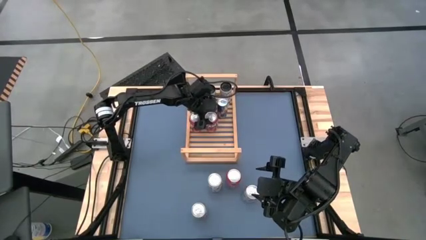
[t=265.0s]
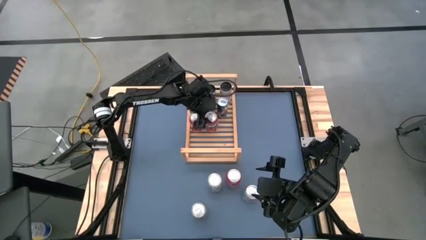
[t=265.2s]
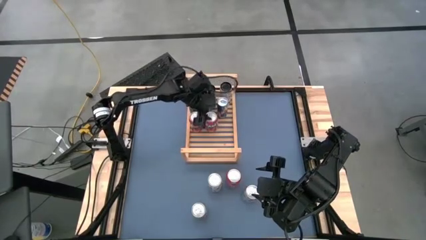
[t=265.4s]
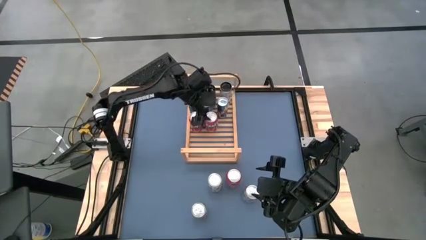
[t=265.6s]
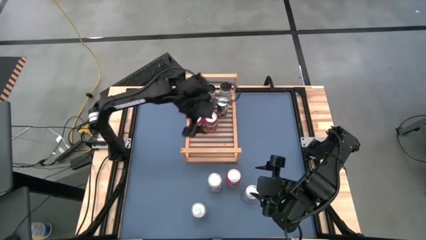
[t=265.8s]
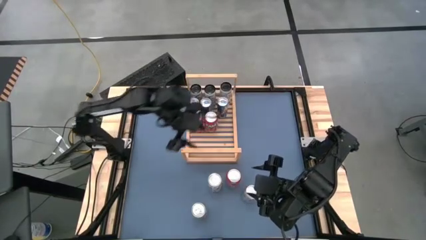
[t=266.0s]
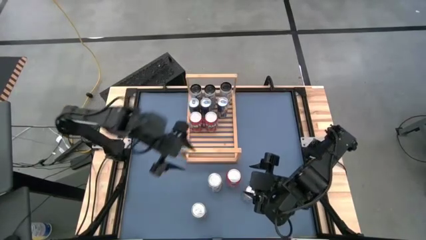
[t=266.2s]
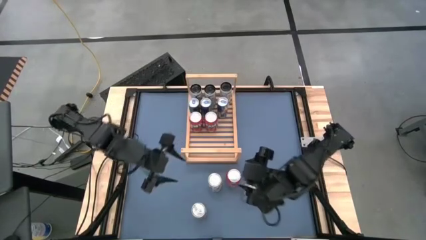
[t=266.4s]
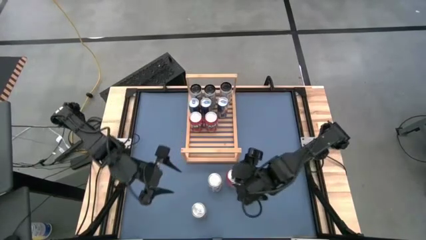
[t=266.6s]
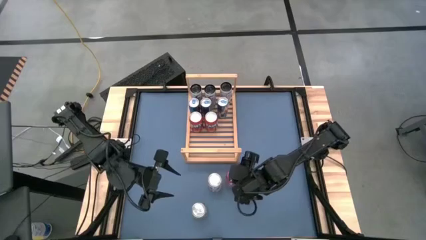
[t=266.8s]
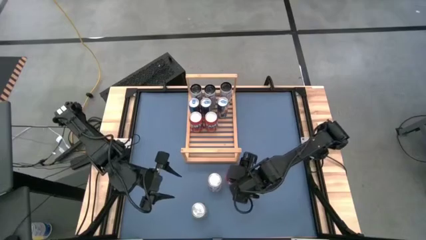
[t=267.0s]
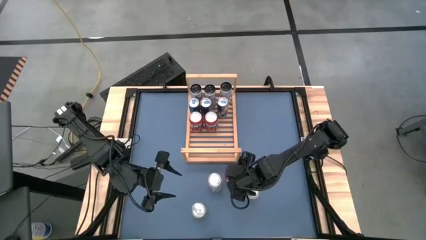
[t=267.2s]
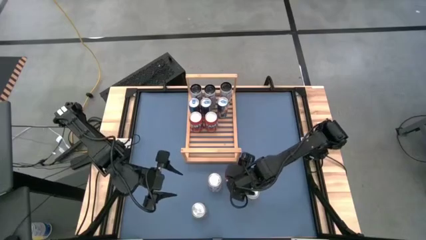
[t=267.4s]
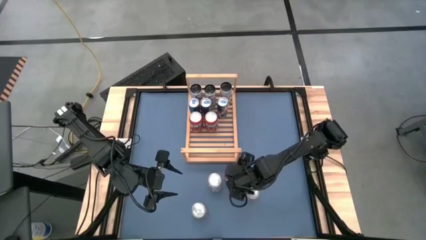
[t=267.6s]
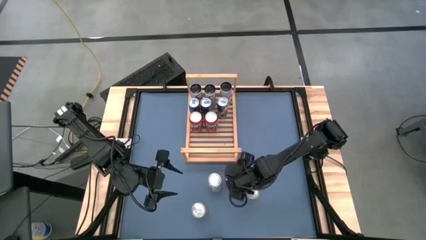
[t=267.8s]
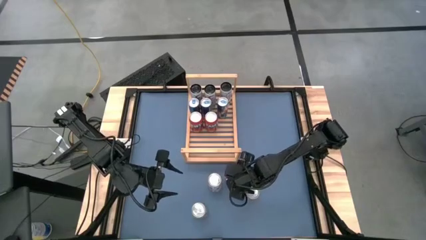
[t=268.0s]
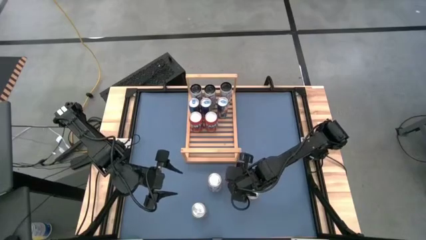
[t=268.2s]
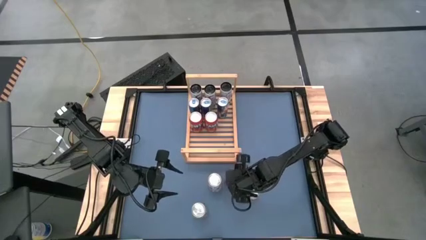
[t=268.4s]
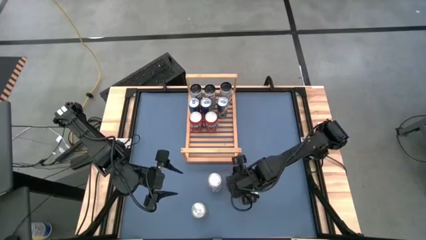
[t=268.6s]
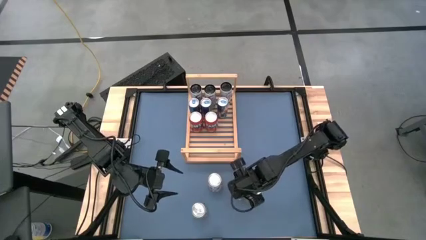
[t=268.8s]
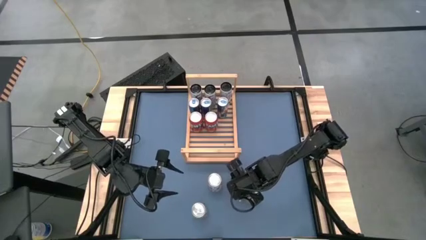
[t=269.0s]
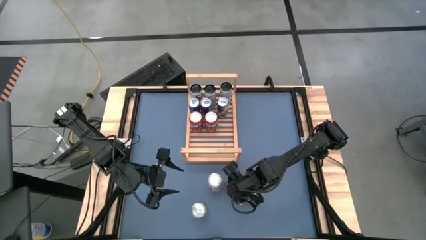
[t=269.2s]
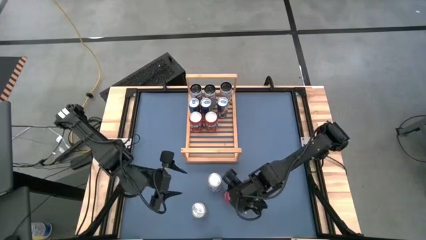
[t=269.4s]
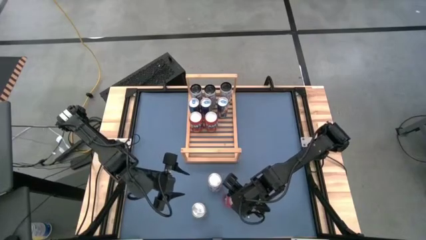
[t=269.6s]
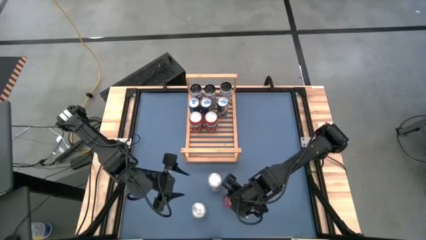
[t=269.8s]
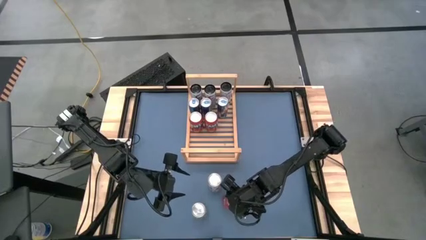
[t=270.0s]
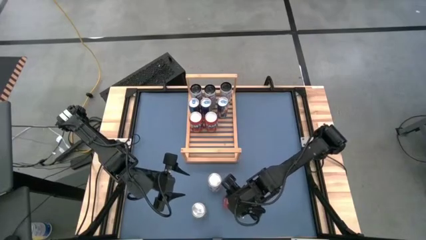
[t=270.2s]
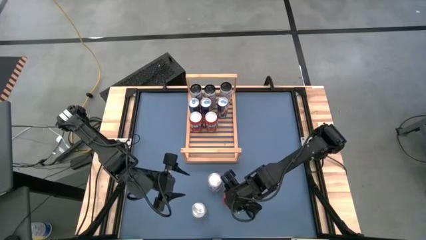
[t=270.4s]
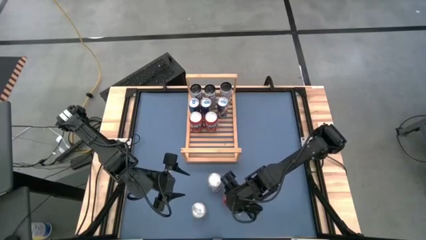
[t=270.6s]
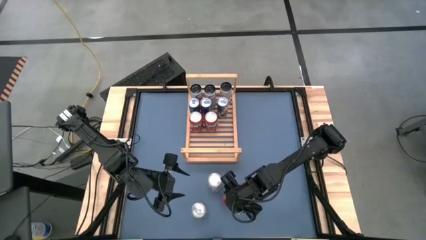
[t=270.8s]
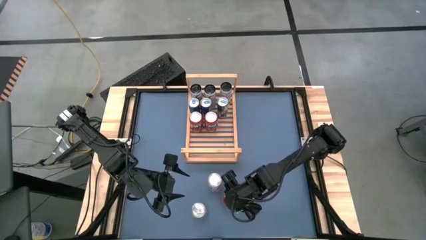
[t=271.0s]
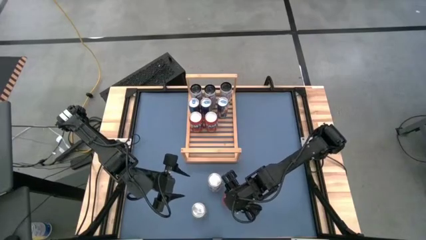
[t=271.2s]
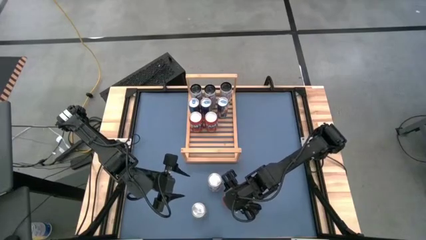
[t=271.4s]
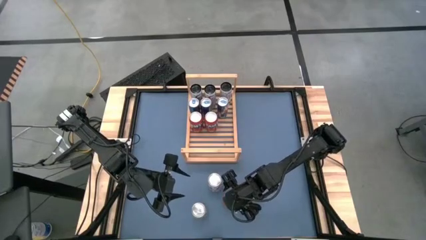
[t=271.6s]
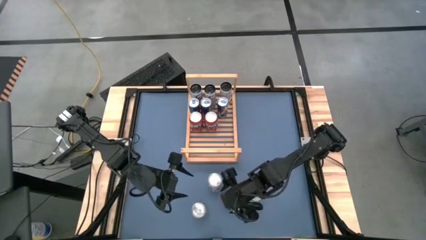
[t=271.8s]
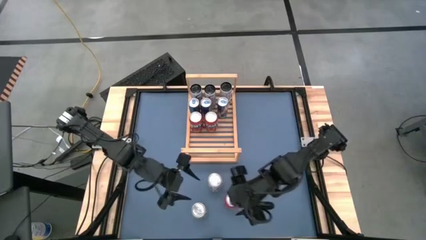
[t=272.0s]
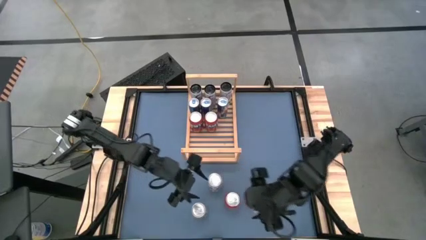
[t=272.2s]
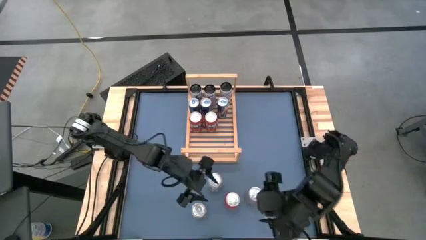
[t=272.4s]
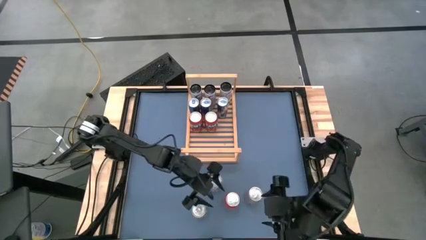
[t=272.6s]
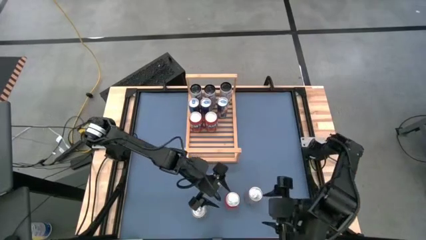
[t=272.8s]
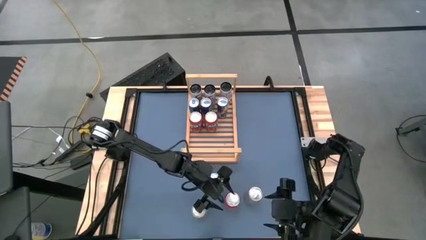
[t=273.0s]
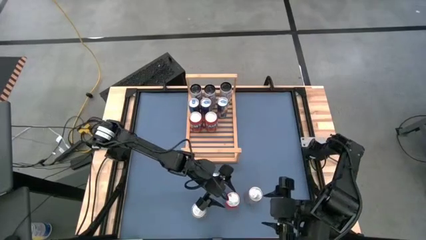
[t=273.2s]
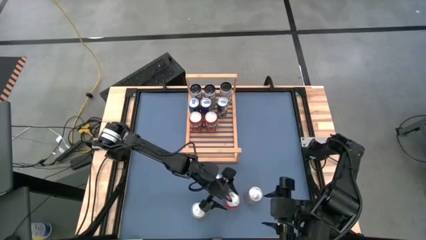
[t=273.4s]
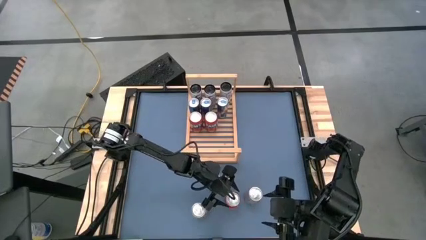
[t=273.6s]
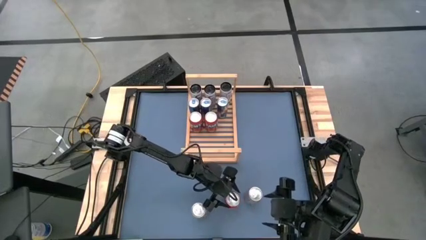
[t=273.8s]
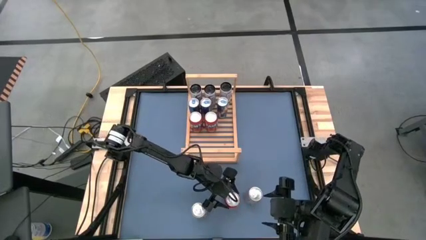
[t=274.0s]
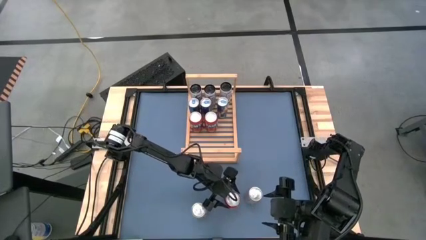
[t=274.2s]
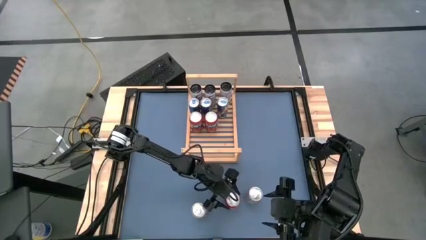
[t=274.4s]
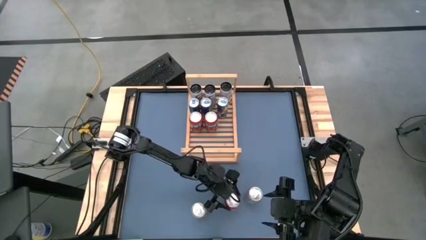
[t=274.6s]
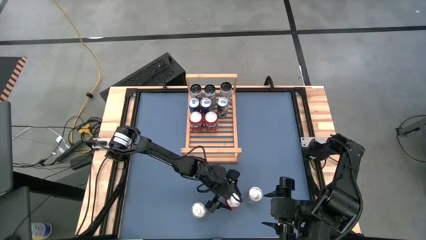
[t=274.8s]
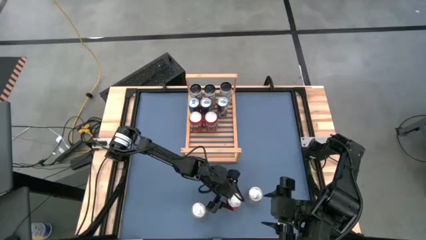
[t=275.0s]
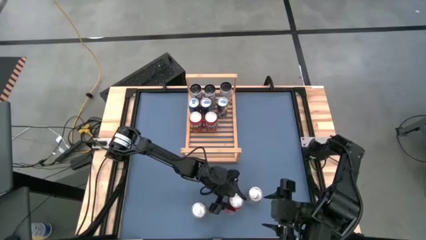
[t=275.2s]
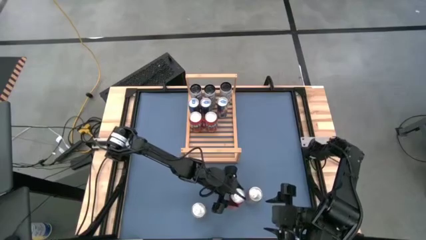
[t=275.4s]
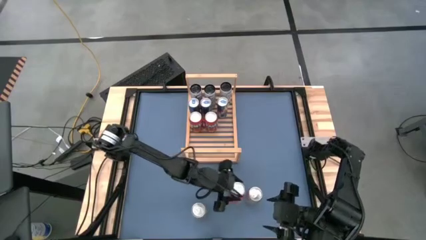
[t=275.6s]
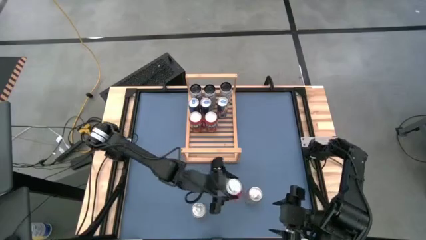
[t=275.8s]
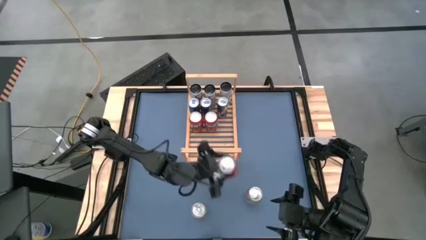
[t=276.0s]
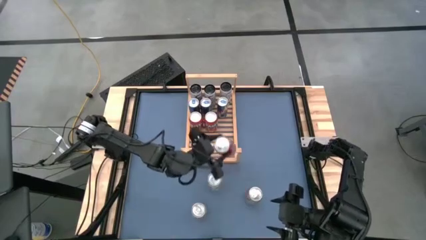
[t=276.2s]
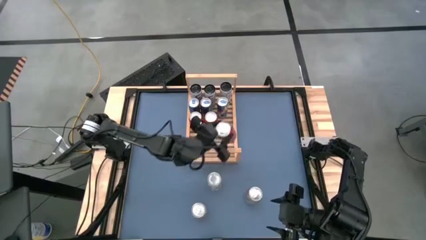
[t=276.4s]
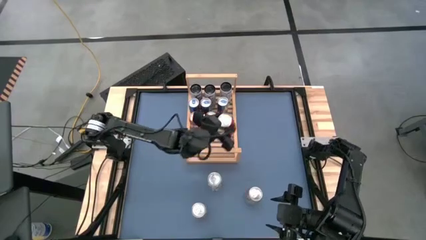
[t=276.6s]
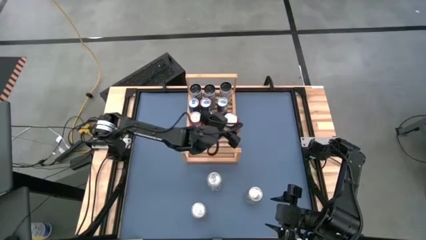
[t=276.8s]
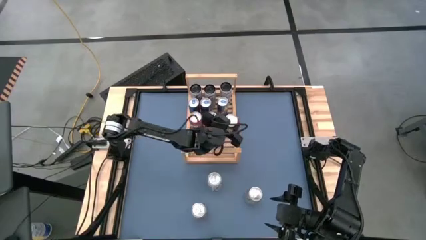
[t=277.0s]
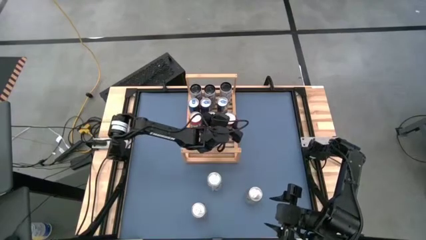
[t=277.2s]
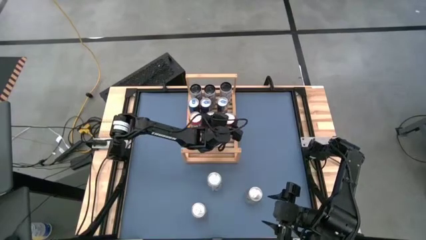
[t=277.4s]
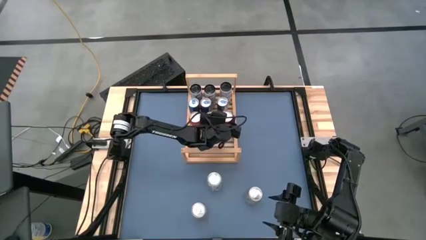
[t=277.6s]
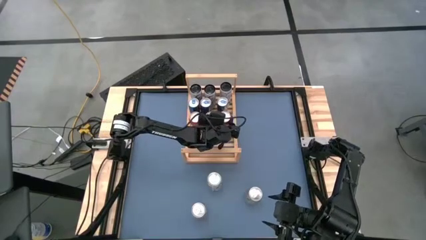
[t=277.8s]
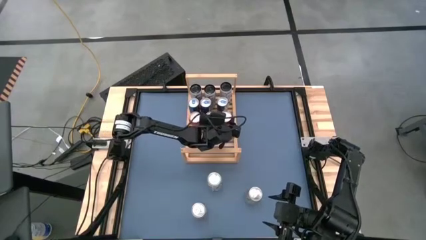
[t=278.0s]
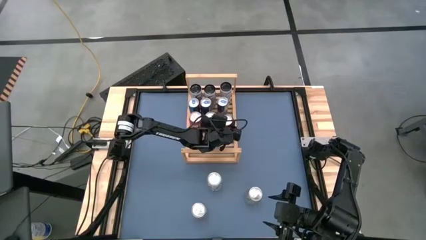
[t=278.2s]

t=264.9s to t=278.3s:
Task: Place canned beverage on shelf
Put the orange soda can on the shelf aligned with the other orange soda cans

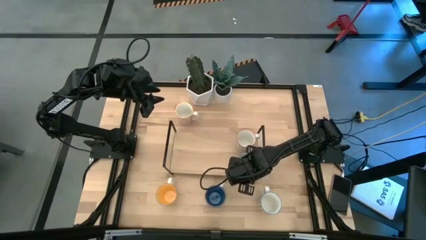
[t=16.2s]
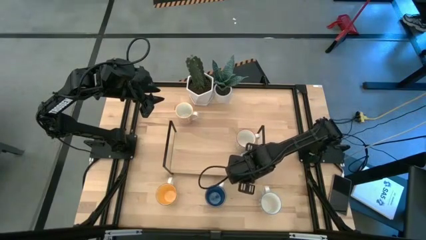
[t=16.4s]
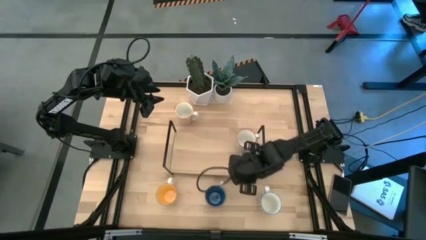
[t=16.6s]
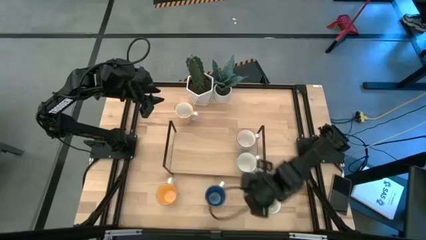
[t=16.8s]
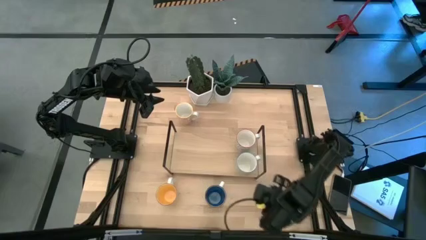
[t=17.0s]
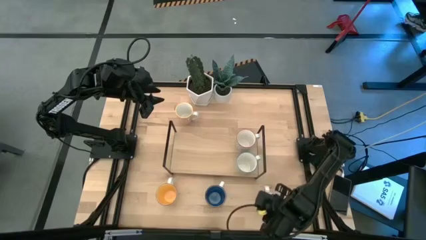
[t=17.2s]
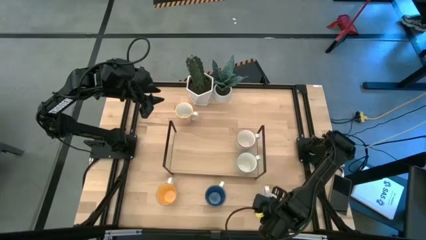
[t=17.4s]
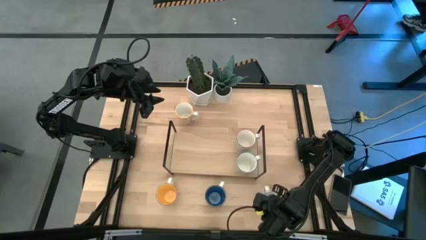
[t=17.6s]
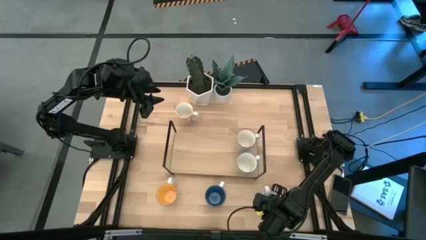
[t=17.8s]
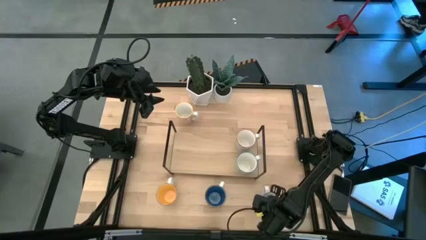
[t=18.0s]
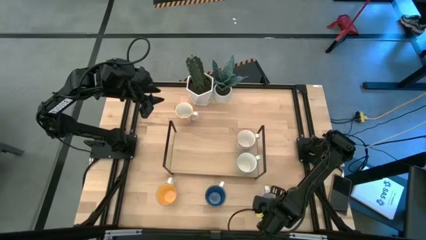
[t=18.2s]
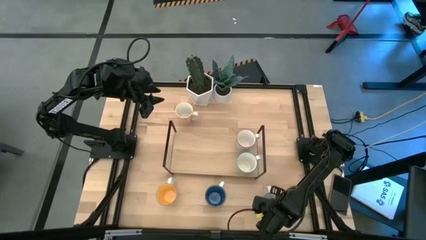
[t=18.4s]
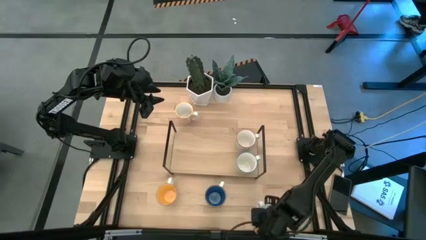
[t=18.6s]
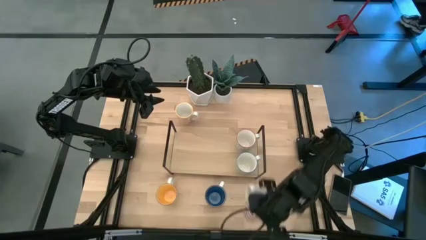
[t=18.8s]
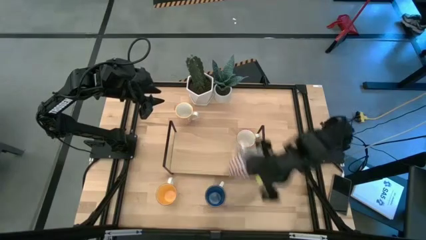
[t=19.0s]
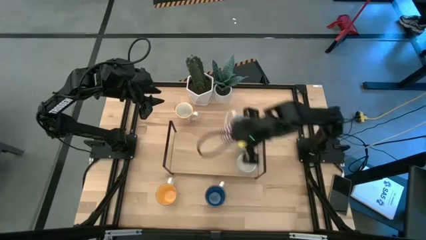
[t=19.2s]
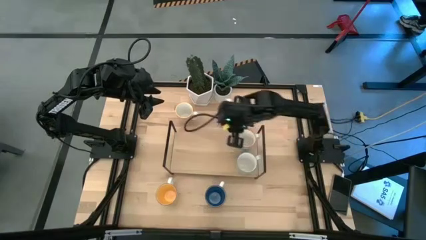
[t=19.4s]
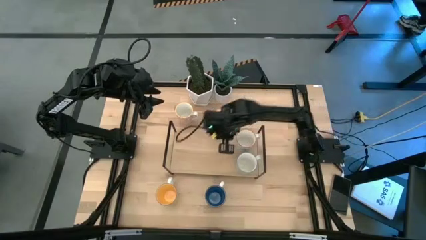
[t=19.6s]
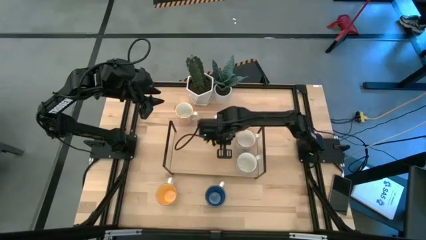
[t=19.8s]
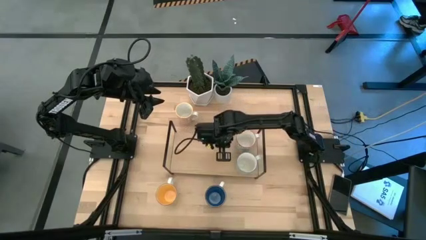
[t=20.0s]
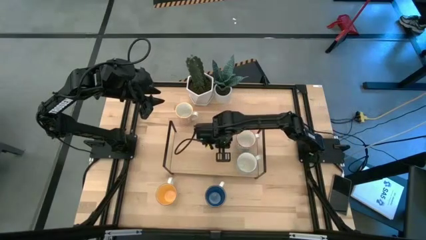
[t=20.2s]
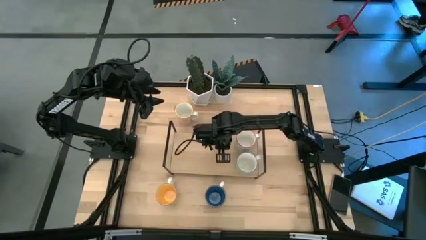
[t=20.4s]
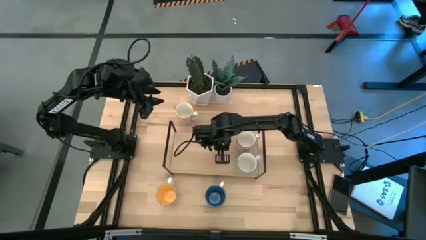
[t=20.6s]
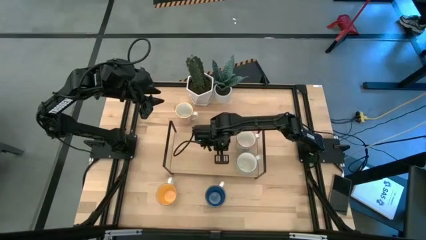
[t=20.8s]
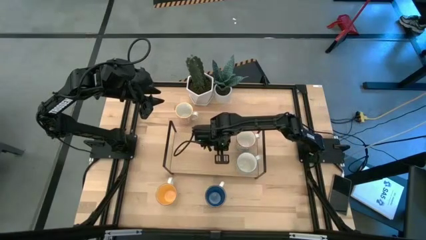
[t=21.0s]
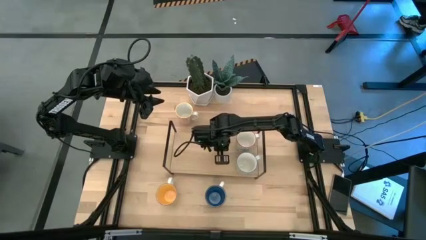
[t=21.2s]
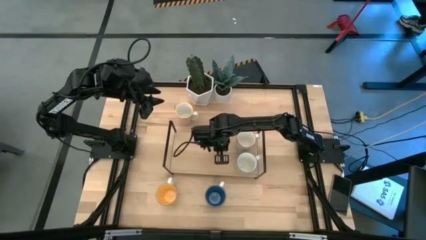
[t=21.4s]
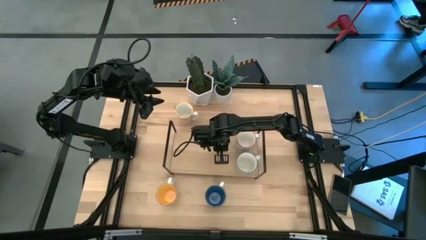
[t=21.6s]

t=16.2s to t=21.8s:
Task: Place coffee mugs
Put the red mug on the shelf
